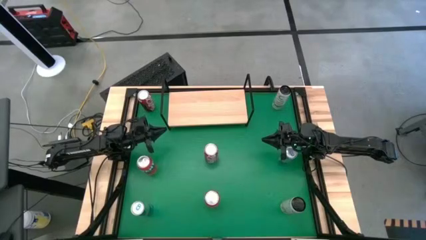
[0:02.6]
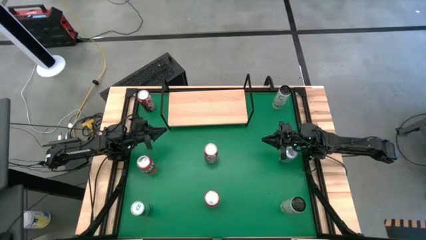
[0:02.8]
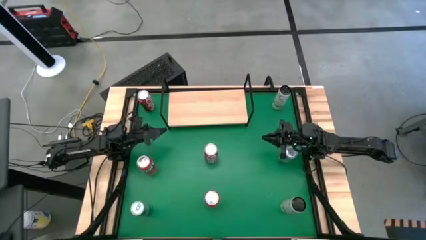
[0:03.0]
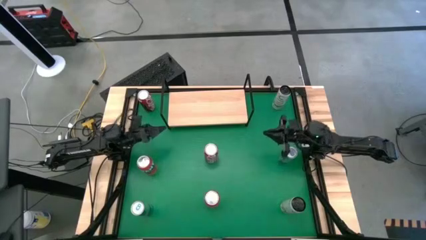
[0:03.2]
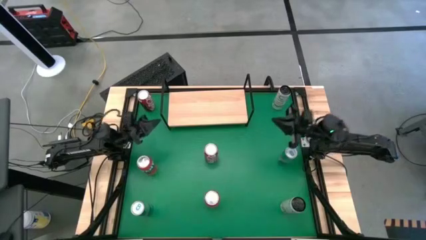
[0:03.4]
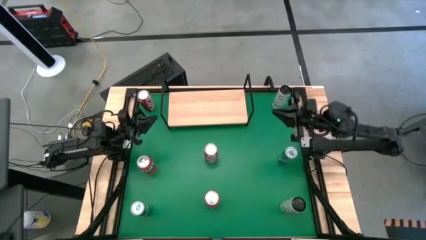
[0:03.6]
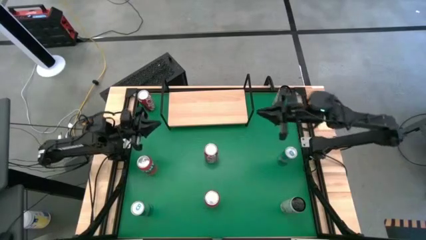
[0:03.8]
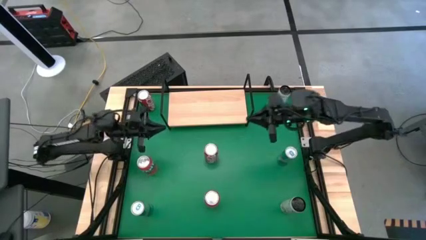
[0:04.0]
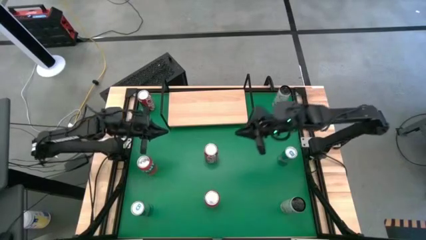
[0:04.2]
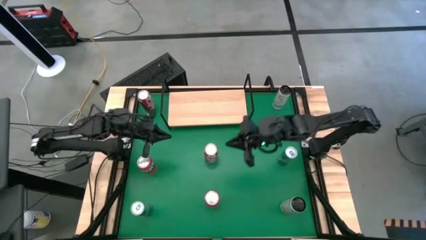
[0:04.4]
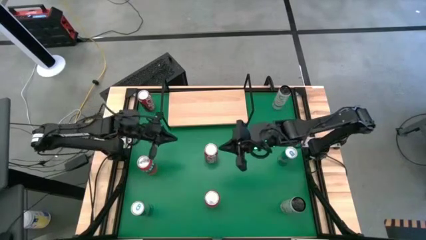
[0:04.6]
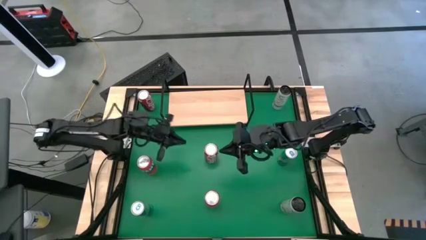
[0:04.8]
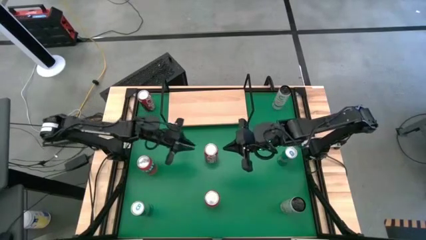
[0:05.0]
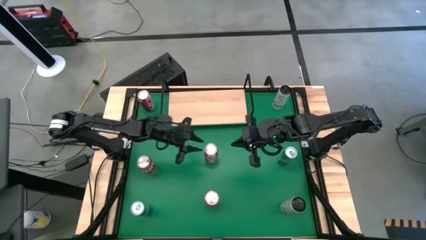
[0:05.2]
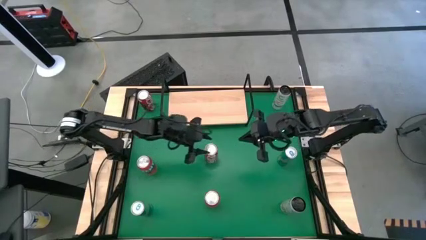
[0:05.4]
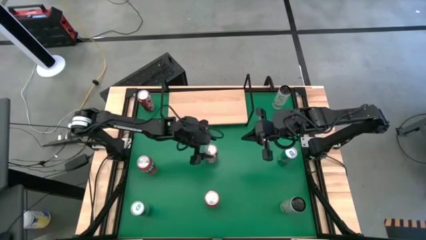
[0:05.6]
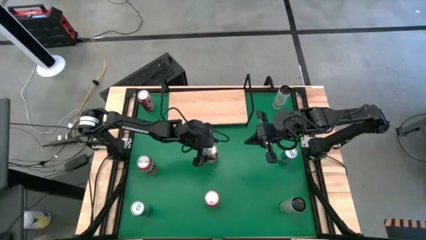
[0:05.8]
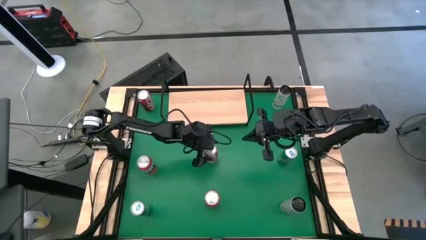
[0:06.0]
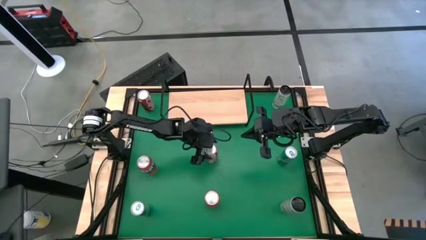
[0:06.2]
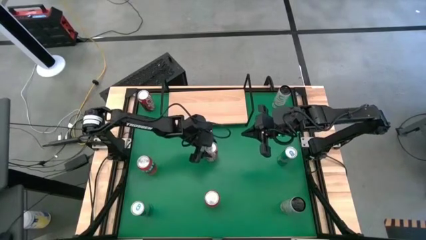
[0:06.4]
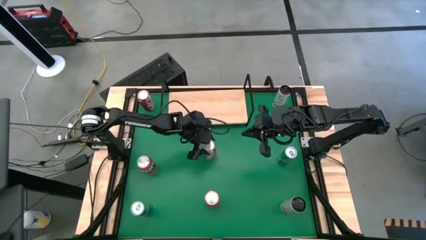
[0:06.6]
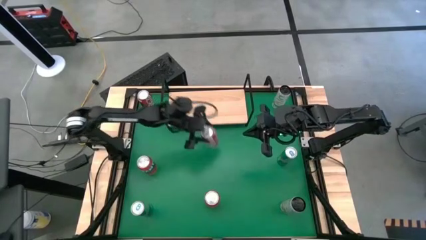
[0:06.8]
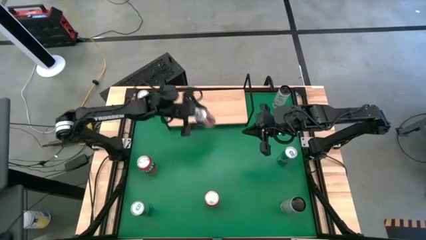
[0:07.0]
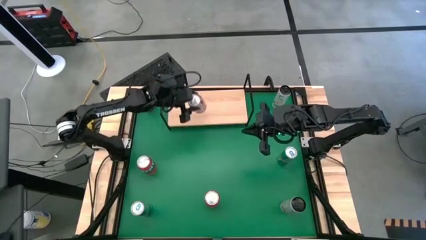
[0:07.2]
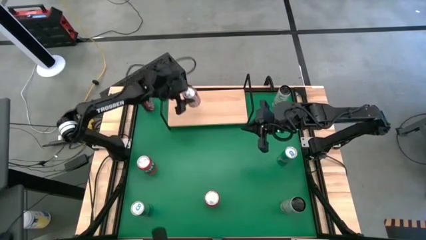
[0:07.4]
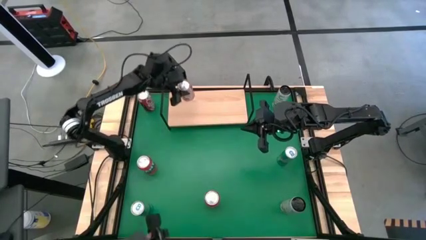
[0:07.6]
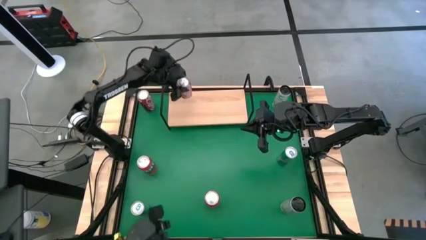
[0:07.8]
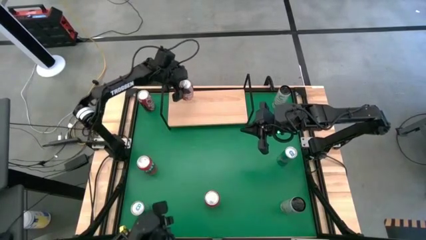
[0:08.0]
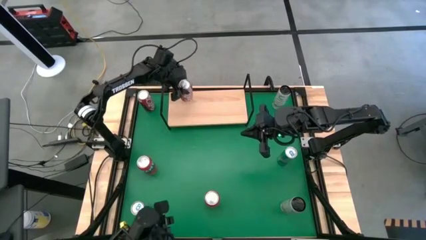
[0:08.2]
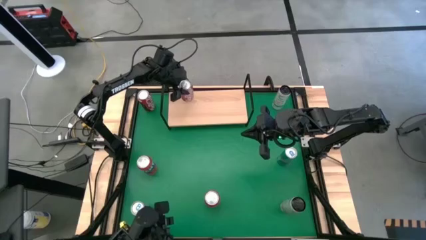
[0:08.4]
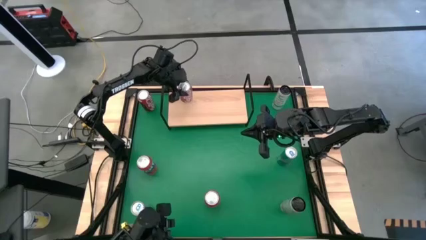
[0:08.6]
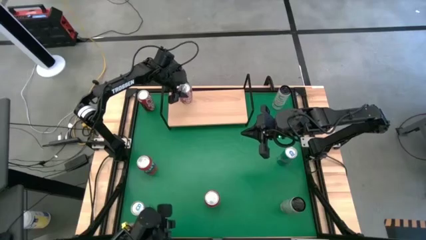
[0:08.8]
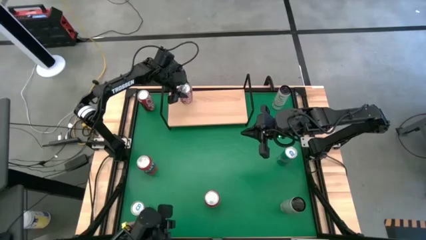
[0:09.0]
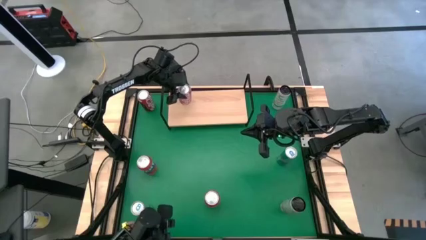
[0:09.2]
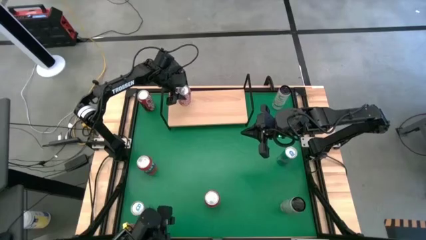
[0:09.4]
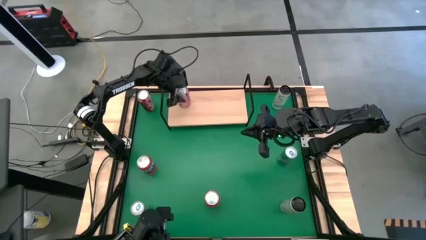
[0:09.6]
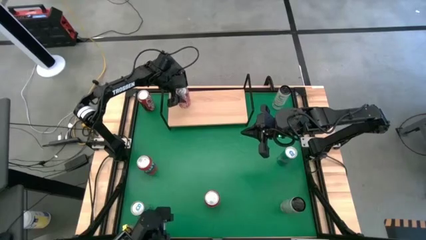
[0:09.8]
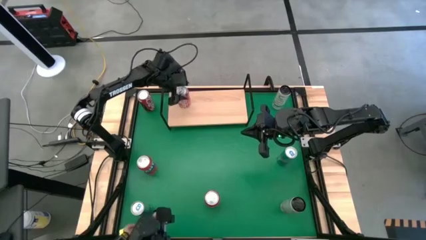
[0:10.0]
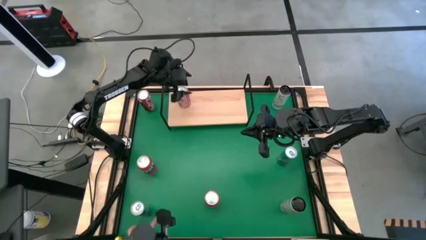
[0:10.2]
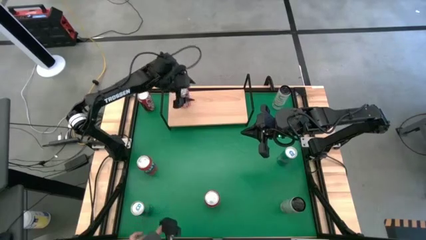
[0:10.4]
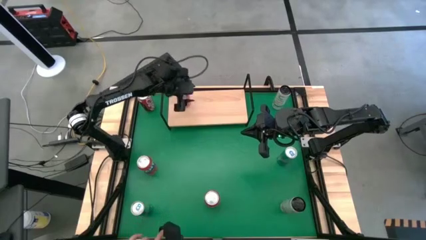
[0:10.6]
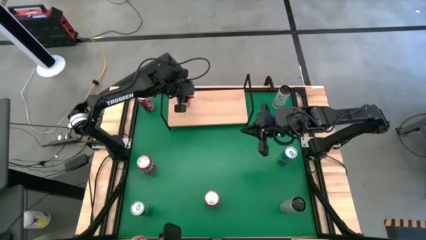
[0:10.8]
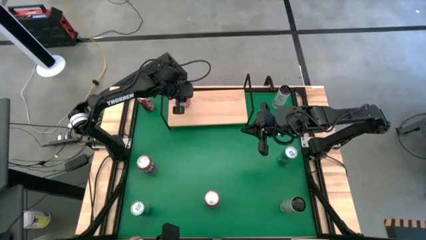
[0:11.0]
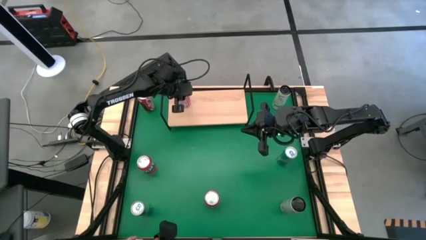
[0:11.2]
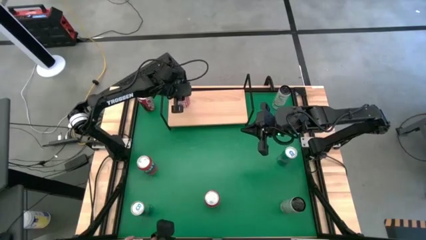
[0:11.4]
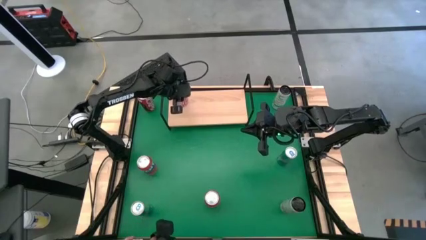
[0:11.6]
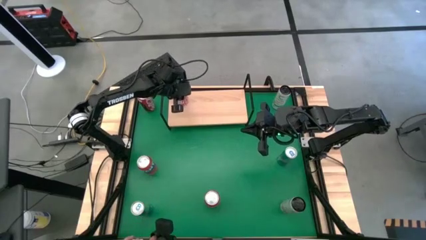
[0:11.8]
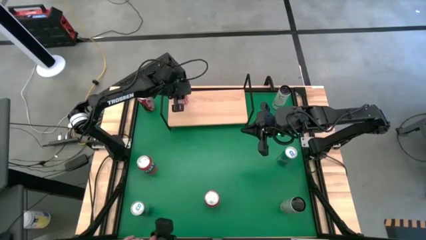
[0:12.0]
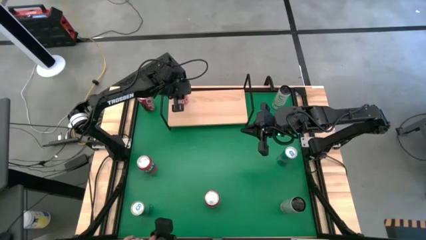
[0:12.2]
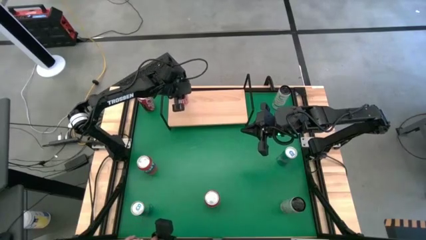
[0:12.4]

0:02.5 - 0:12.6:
Task: Place canned beverage on shelf
Put the bottom red-black soda can on the shelf

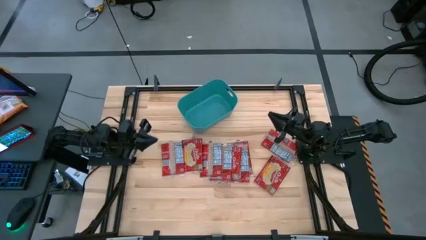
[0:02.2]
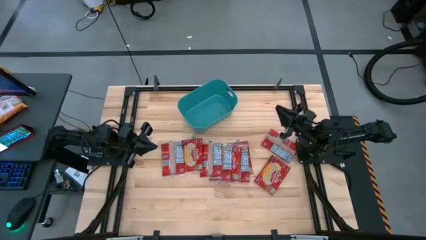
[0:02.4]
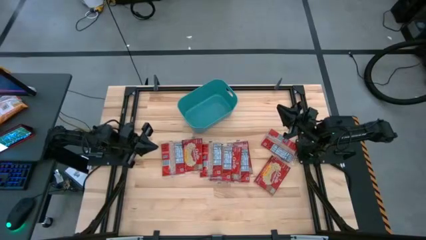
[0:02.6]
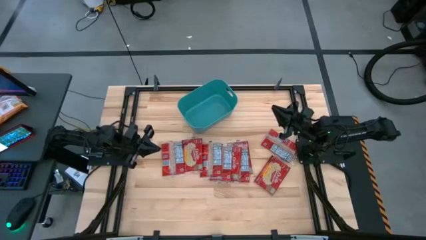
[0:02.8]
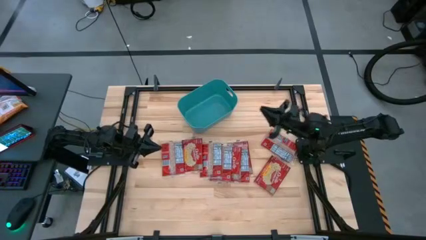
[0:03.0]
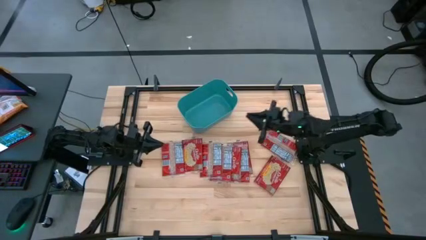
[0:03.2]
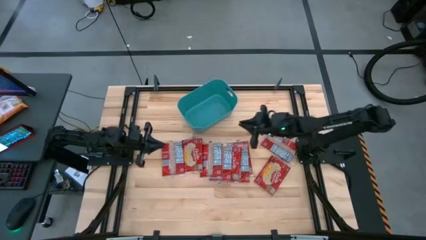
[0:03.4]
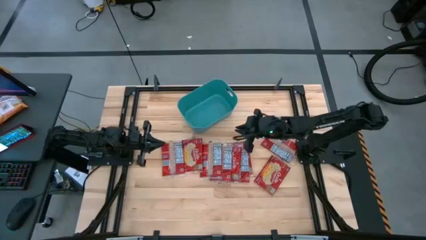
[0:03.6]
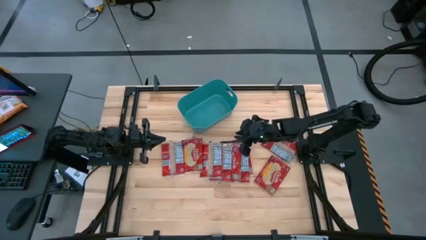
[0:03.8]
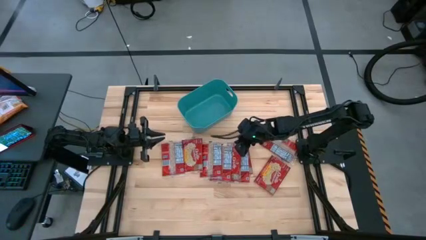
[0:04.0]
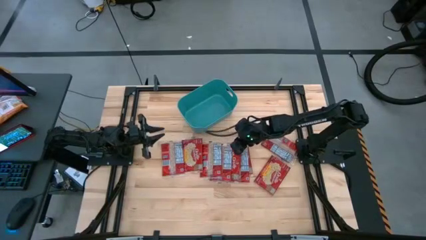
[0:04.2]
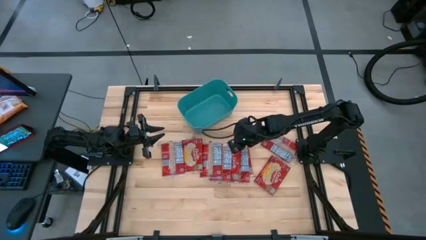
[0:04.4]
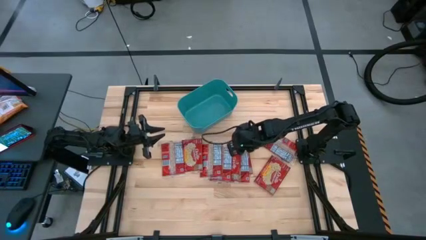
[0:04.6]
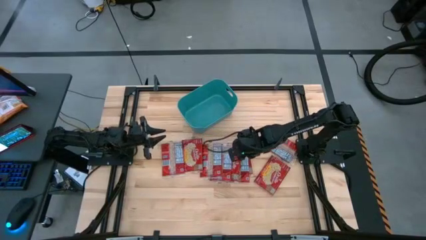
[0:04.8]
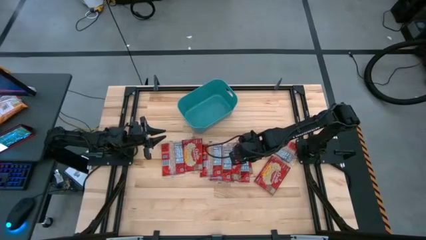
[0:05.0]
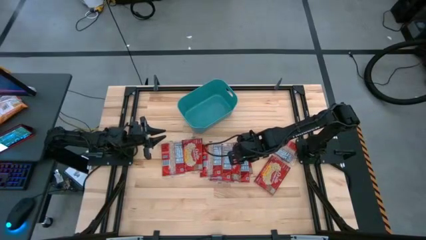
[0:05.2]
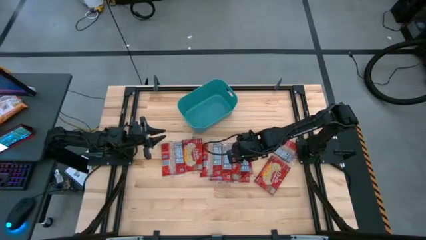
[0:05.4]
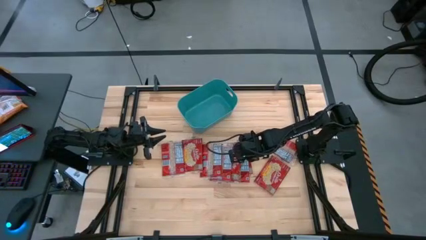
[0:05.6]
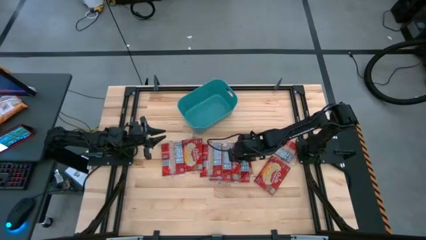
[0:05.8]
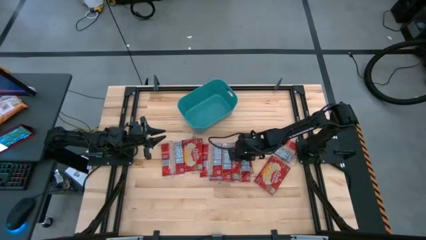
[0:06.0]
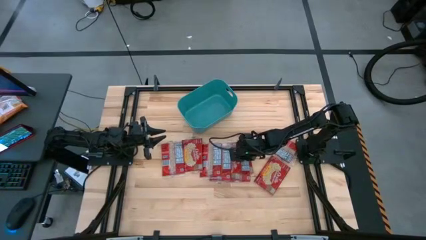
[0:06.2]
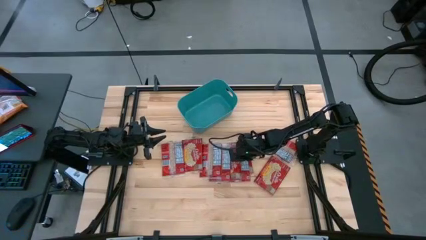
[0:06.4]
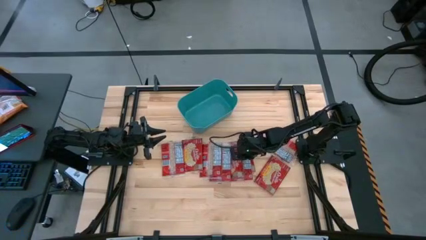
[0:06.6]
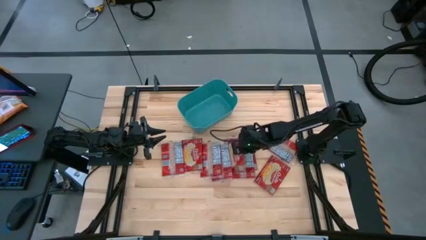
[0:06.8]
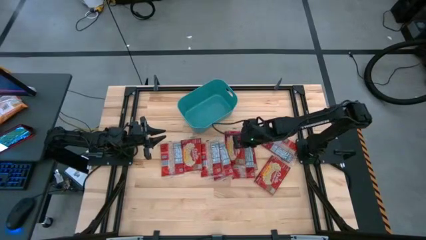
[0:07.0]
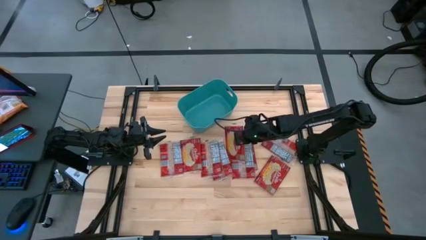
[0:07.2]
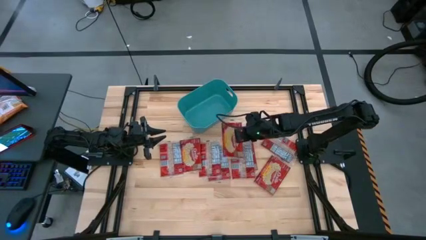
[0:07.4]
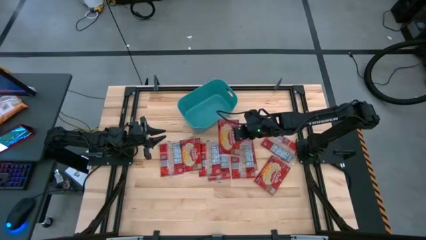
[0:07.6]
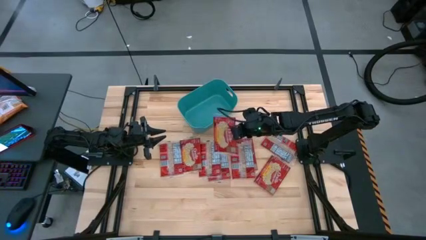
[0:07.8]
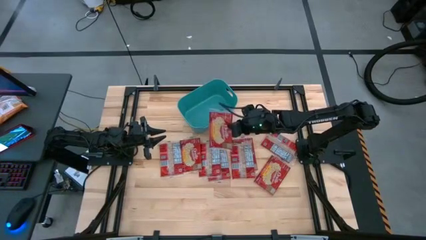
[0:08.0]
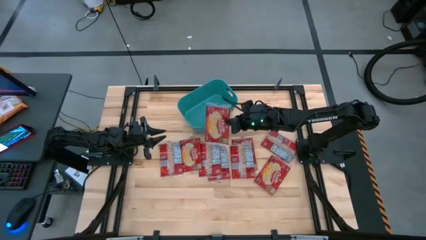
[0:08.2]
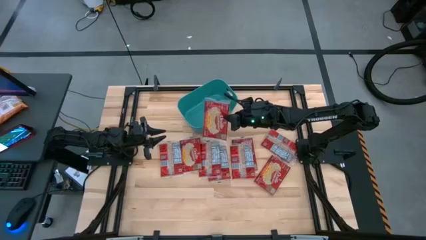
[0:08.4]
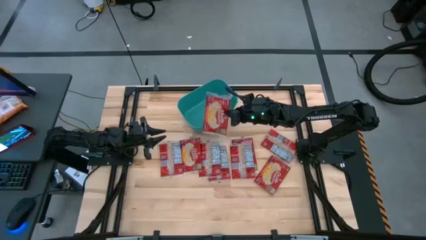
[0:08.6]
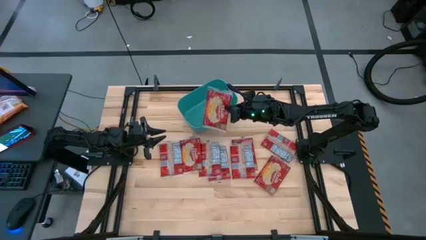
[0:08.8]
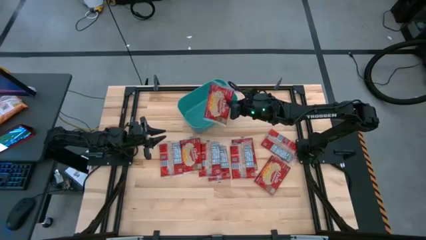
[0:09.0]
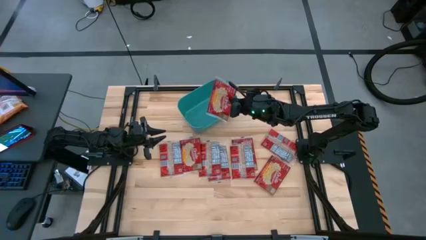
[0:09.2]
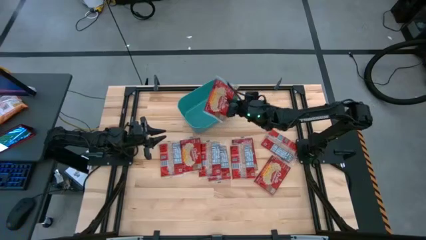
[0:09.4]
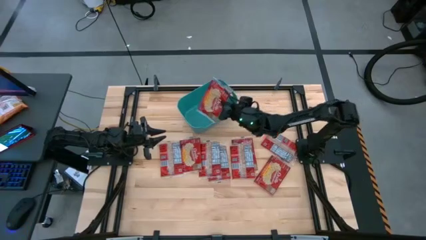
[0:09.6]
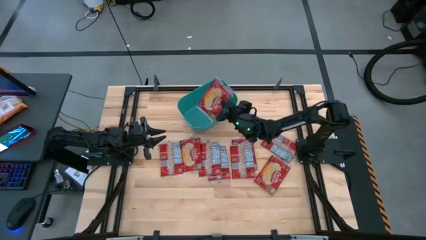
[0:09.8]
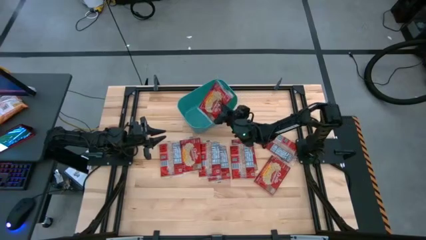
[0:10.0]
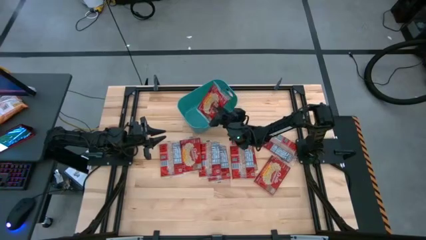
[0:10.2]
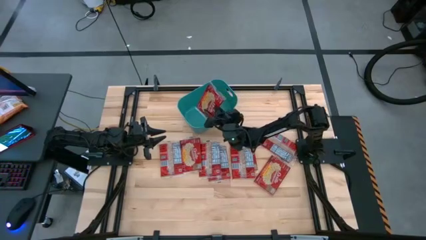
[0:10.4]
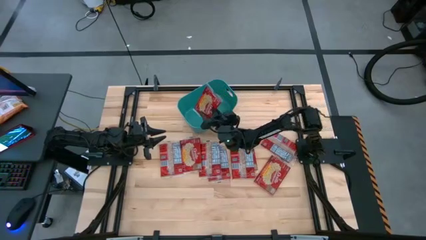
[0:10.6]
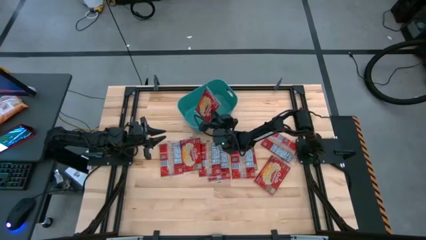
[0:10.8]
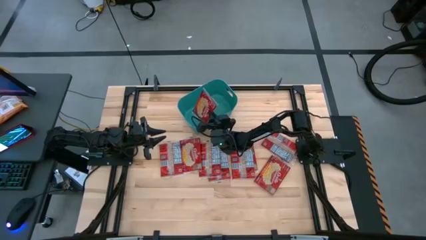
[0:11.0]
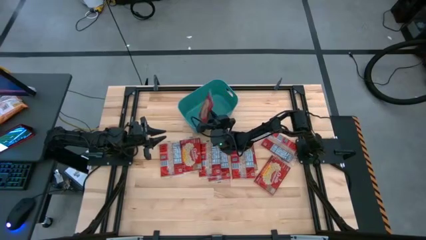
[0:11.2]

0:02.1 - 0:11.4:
Task: Sort popcorn bags into baskets
Put the popcorn bag into the blue bin
